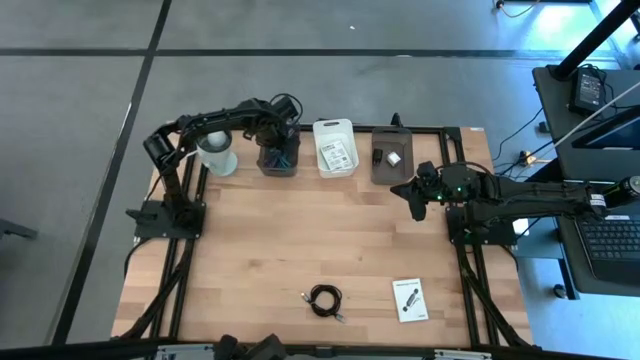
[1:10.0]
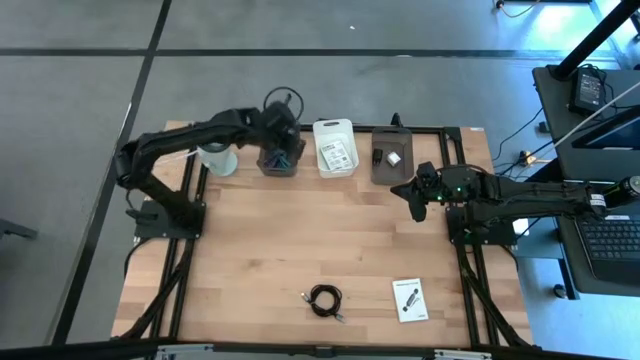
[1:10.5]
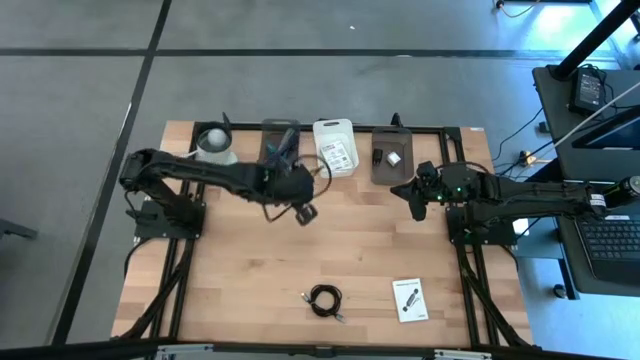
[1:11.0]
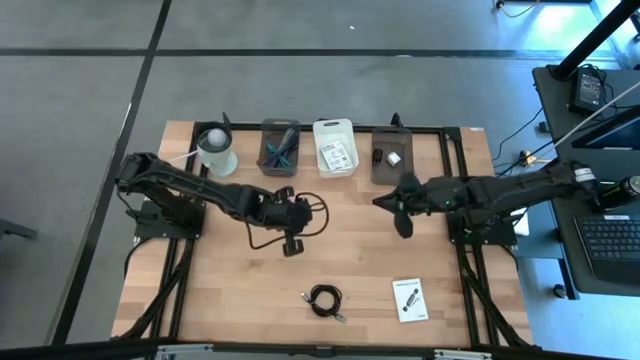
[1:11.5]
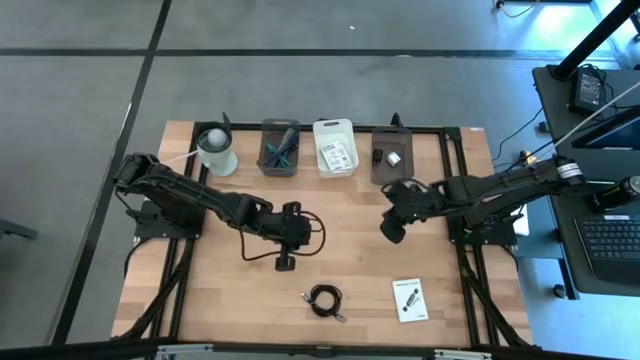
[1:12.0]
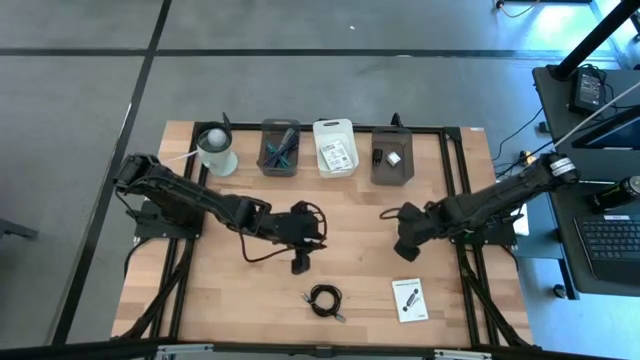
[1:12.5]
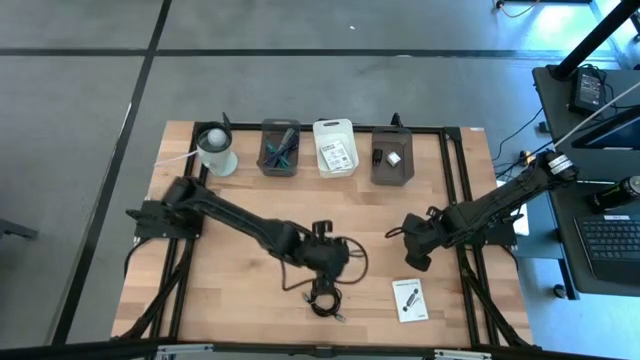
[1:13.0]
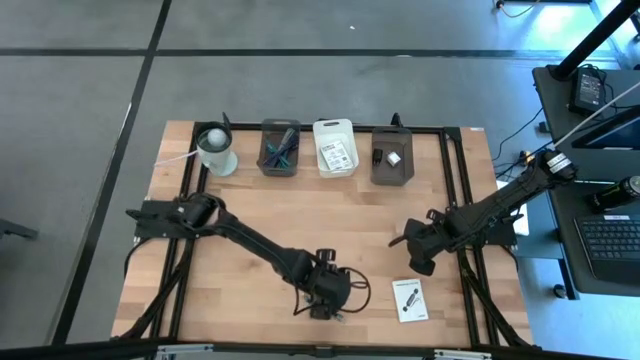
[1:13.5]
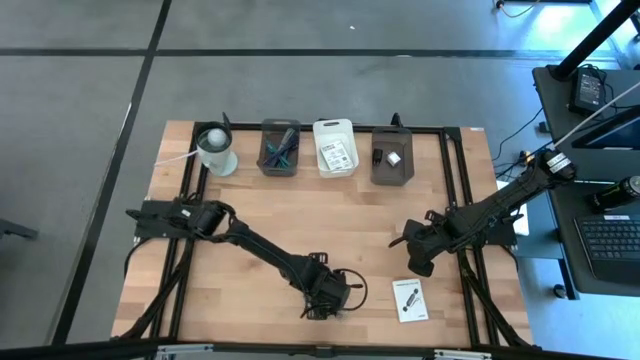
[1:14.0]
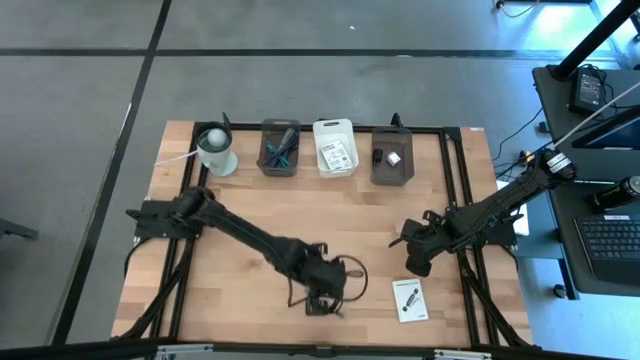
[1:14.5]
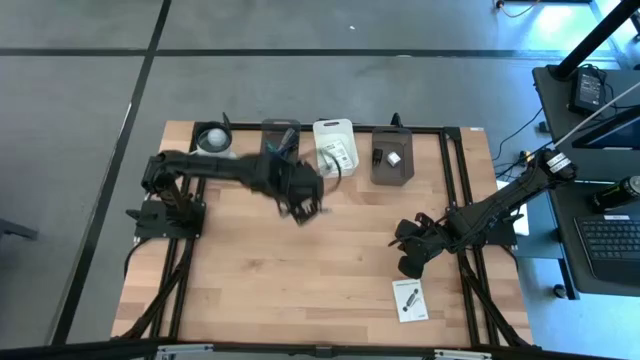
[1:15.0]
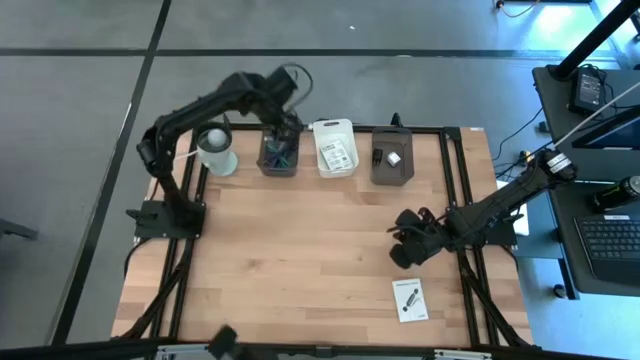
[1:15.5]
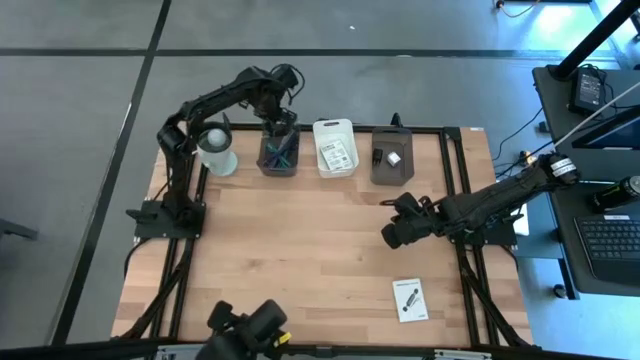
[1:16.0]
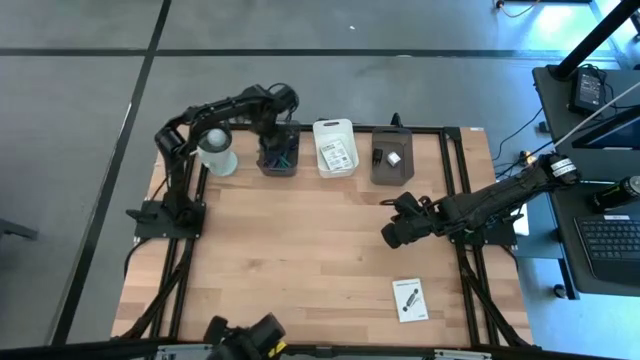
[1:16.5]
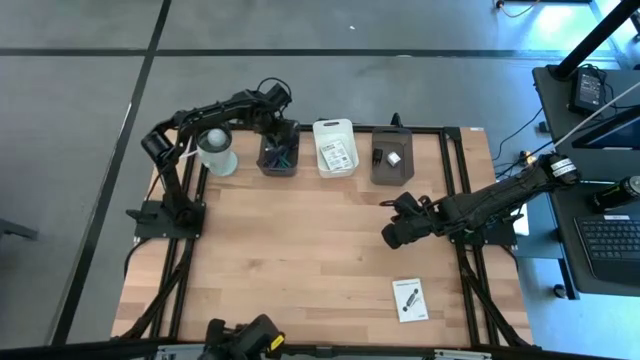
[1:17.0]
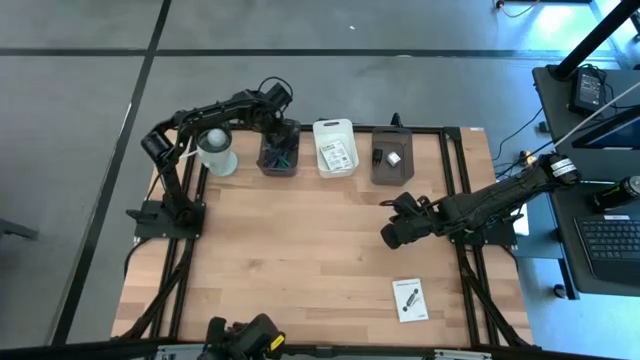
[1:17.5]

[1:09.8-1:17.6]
Task: Pick and place items into bin
Put the black charger cable into the left black bin

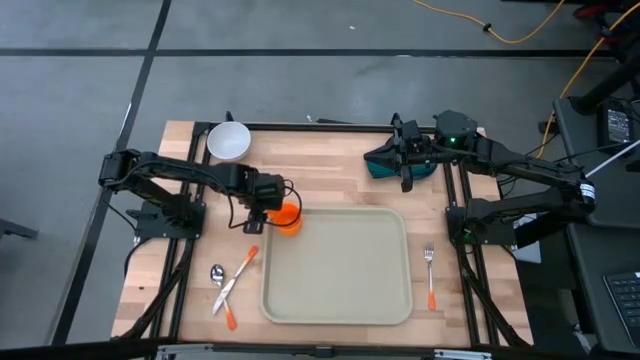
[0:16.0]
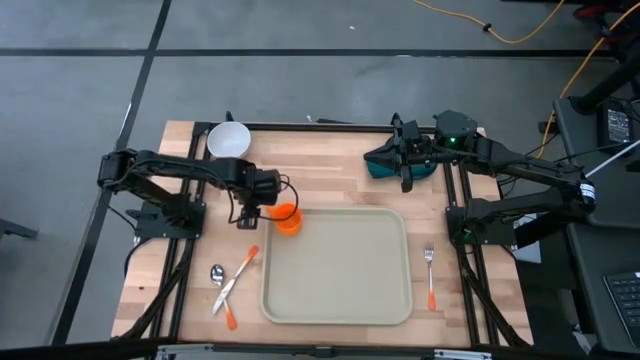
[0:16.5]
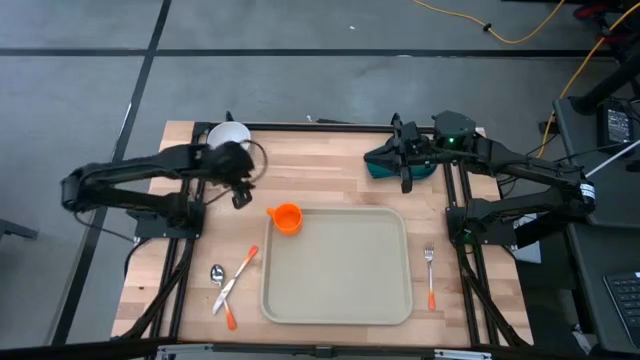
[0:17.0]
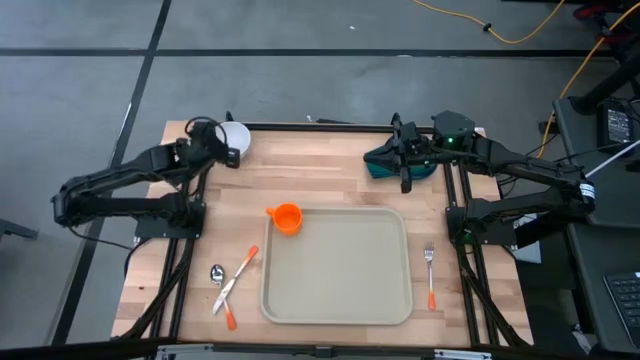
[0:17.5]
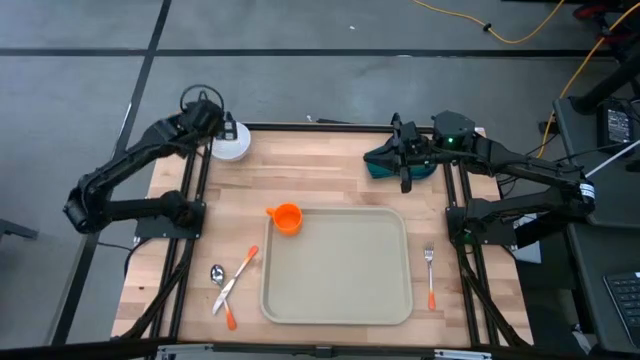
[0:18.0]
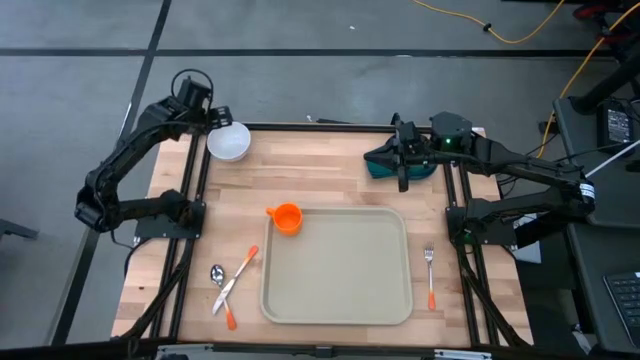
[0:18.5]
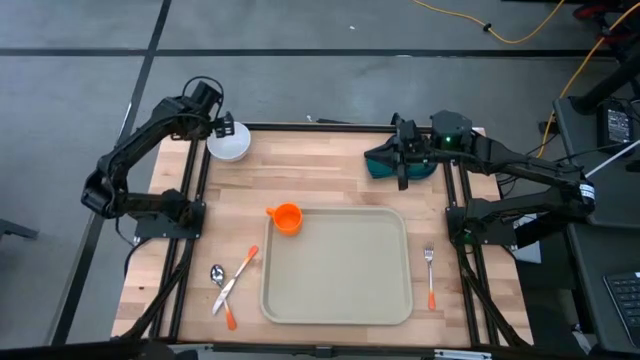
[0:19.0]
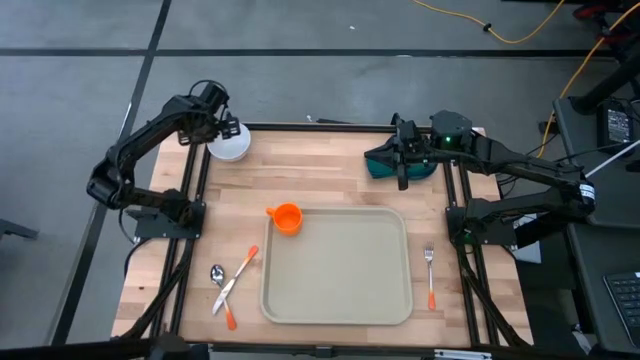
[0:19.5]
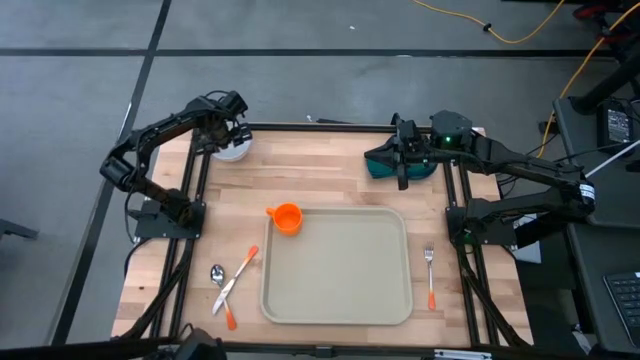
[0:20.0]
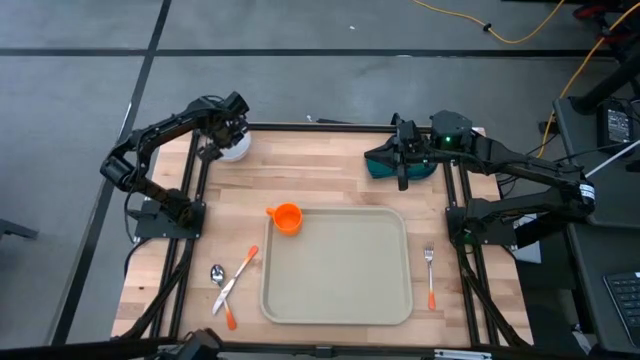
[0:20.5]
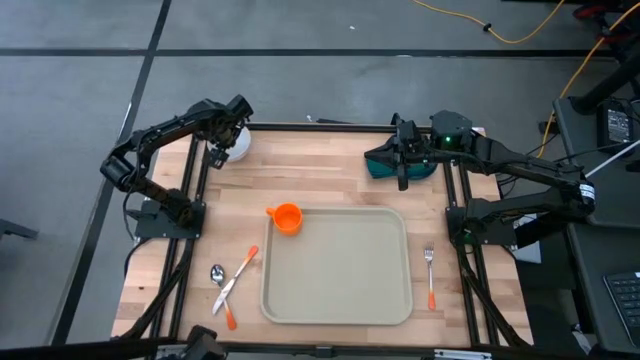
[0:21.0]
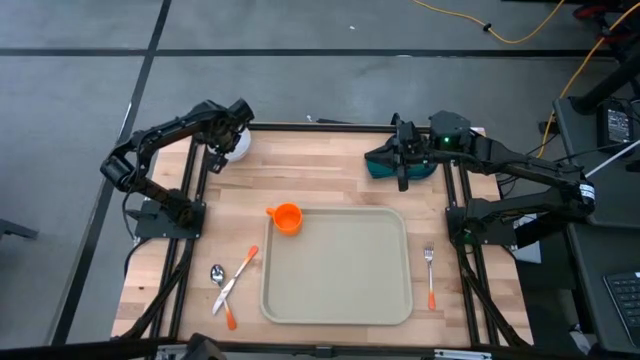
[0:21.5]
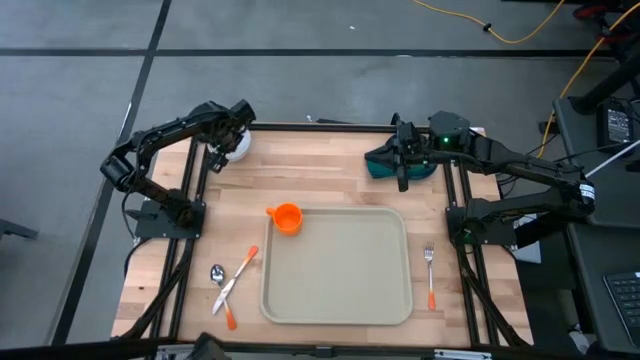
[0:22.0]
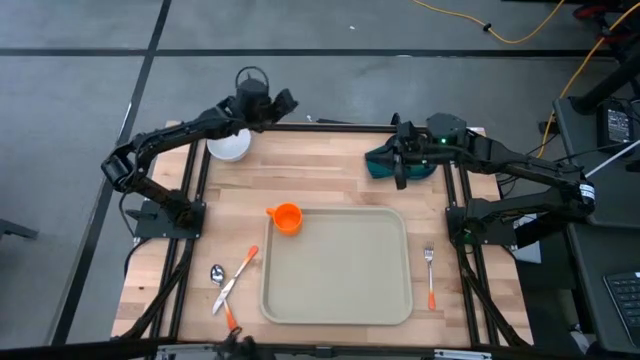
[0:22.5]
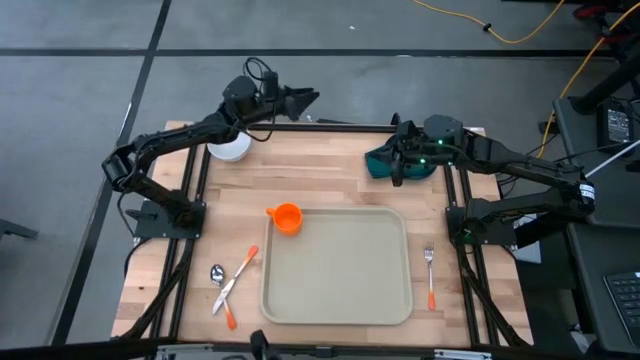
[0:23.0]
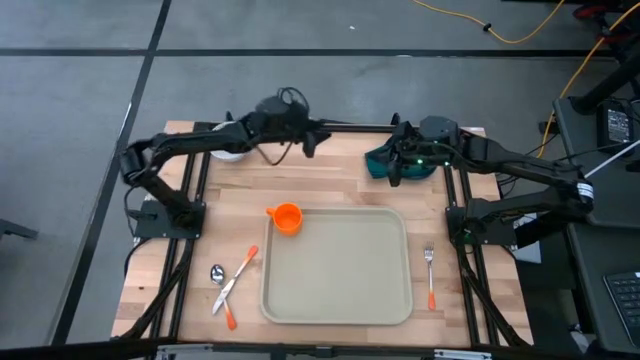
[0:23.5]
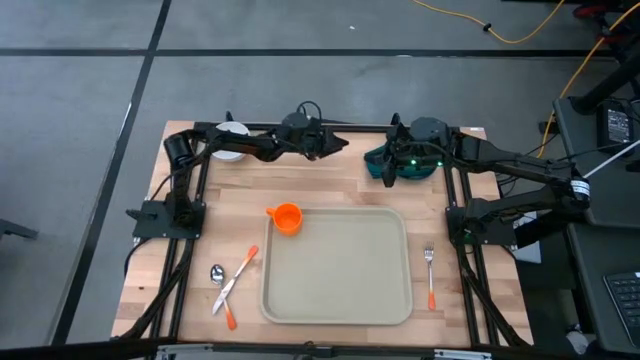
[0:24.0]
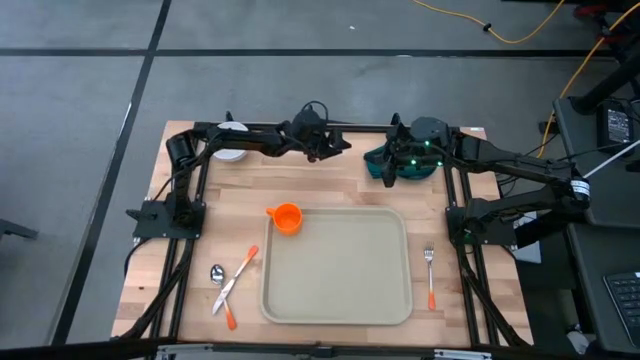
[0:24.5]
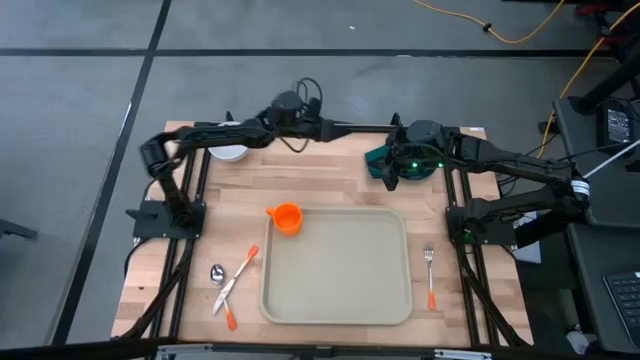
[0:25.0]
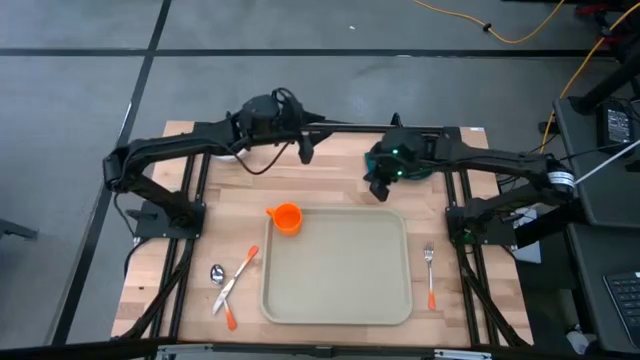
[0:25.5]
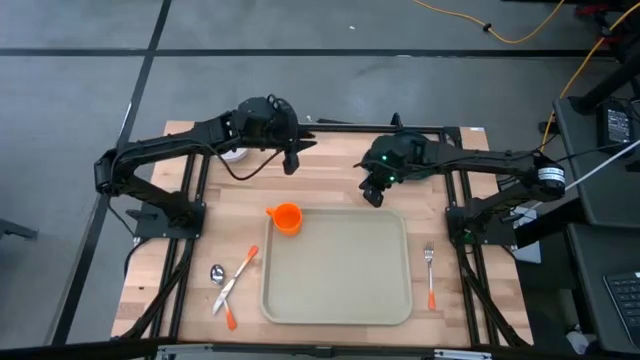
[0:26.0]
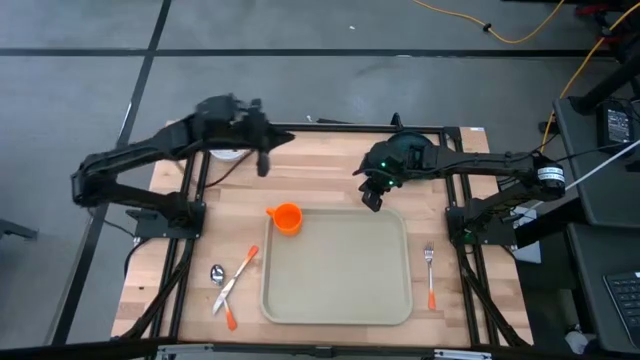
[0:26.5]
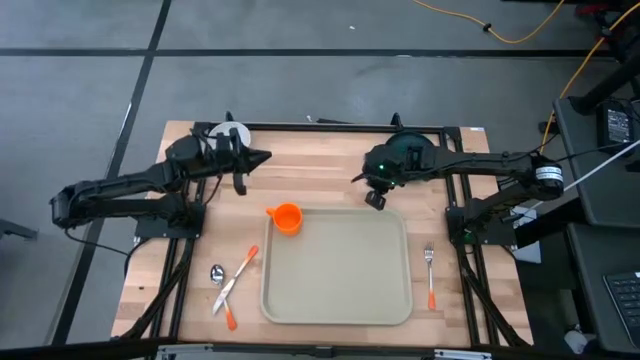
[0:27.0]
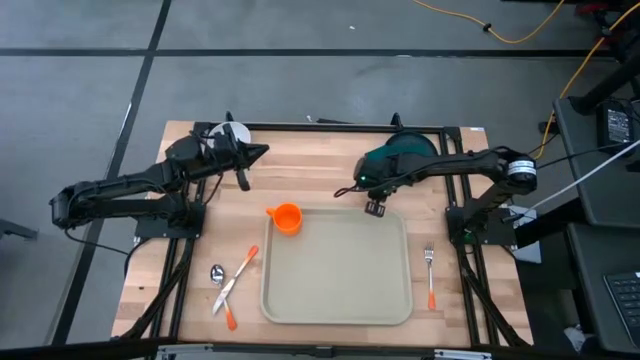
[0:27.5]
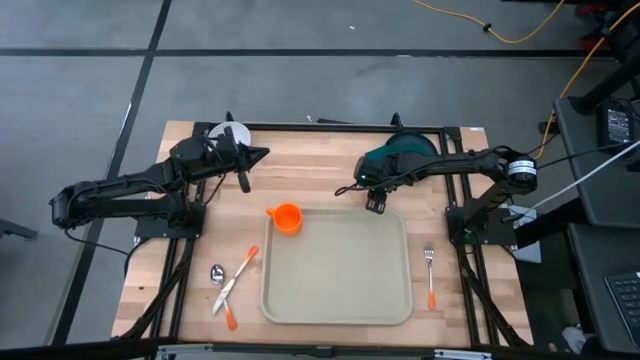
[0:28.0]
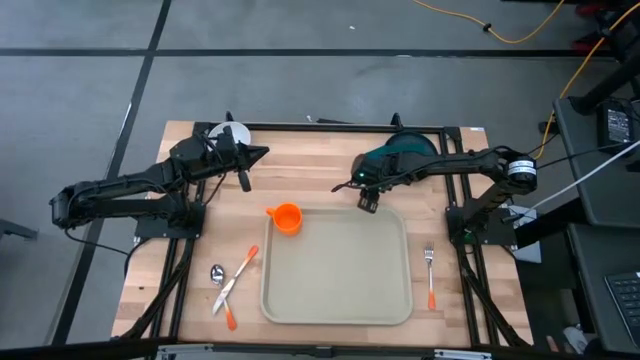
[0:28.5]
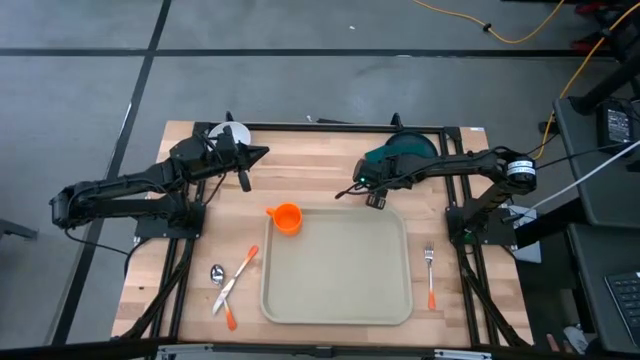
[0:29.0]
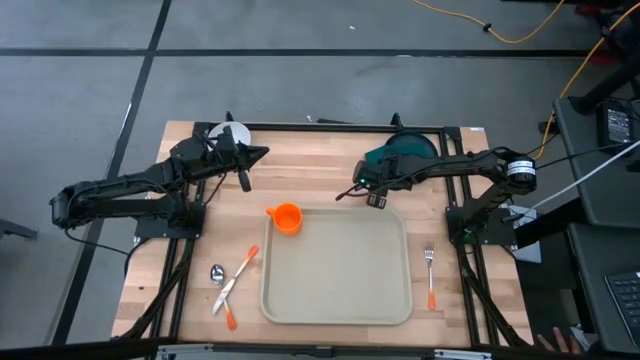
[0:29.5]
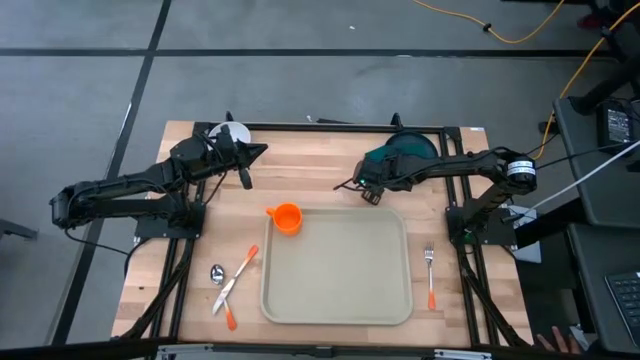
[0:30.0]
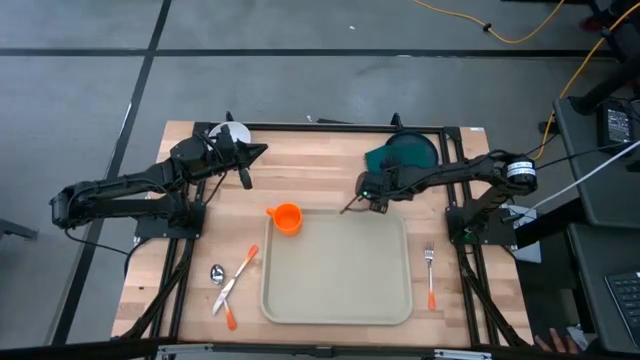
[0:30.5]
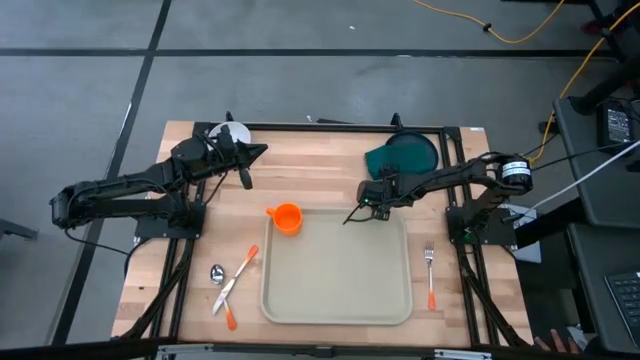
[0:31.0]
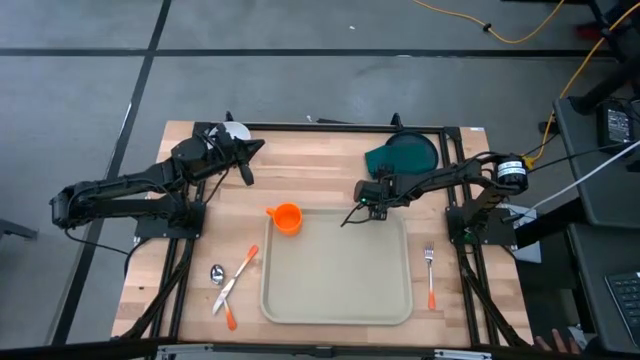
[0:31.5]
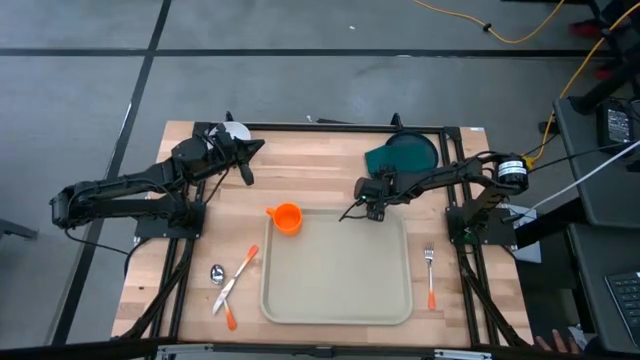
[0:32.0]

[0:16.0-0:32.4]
Task: Set up tray
Put the green napkin on the serving tray to the right of the orange mug
